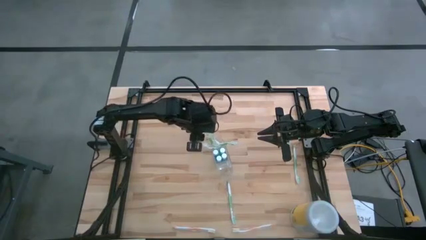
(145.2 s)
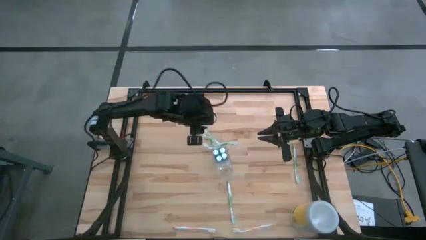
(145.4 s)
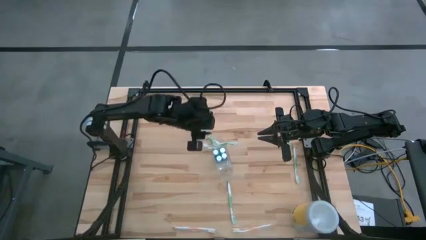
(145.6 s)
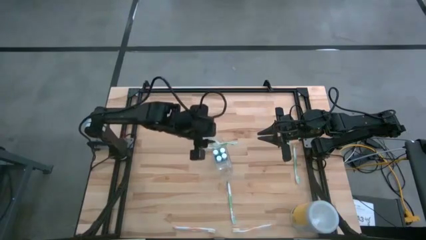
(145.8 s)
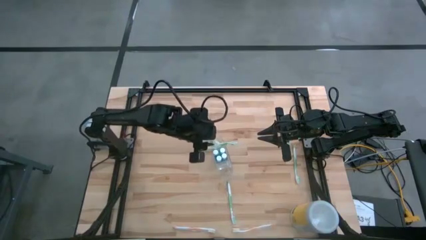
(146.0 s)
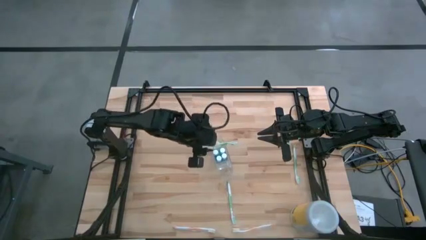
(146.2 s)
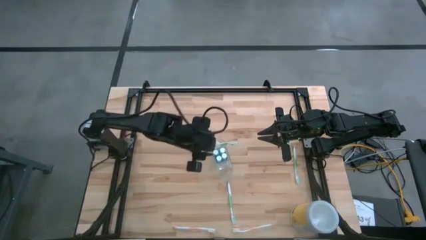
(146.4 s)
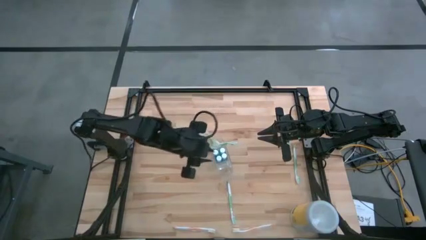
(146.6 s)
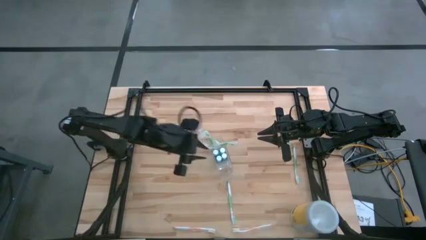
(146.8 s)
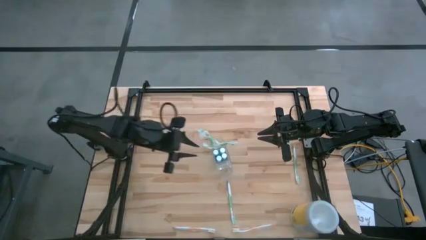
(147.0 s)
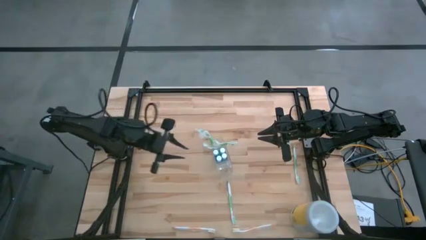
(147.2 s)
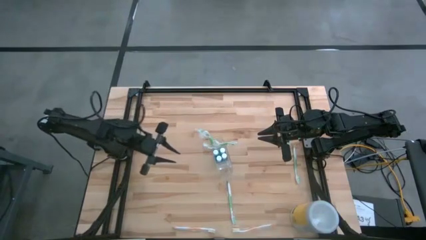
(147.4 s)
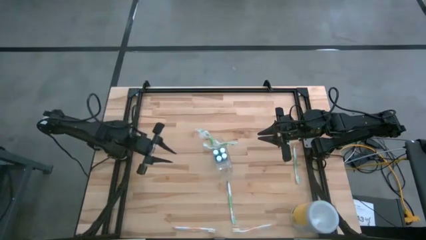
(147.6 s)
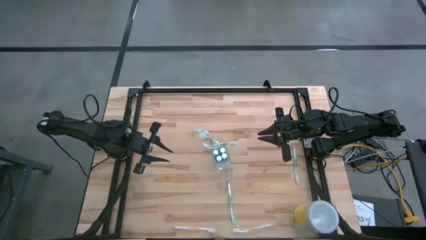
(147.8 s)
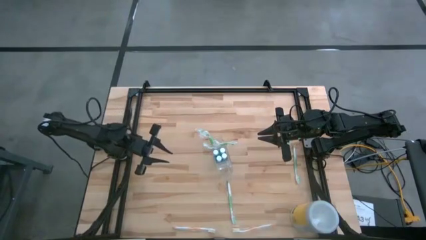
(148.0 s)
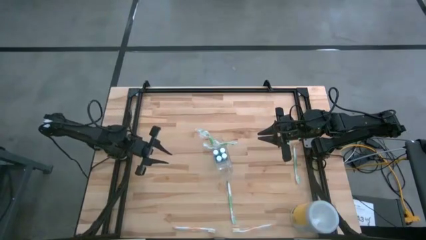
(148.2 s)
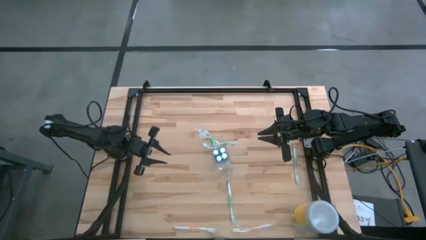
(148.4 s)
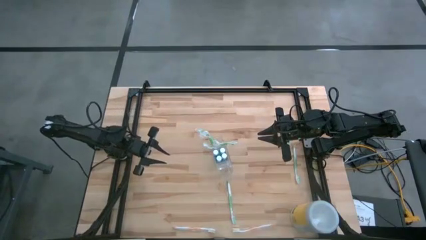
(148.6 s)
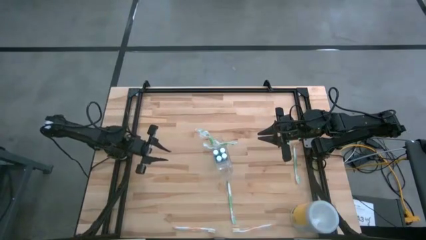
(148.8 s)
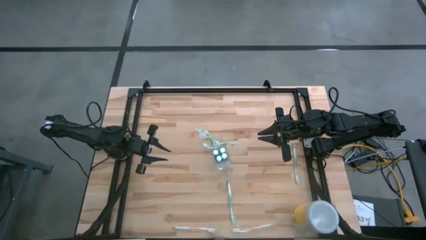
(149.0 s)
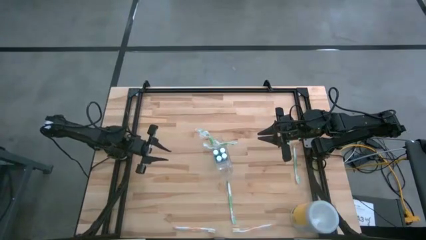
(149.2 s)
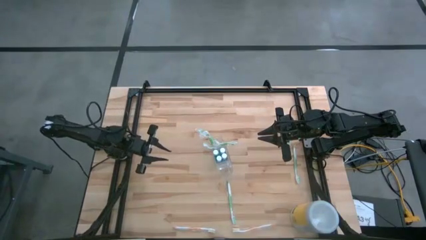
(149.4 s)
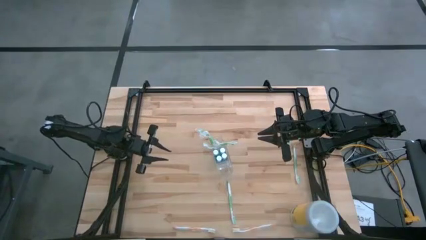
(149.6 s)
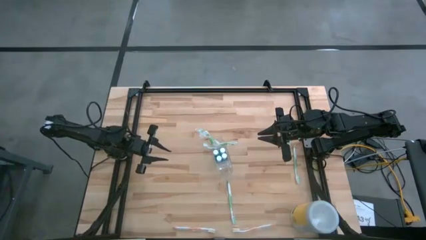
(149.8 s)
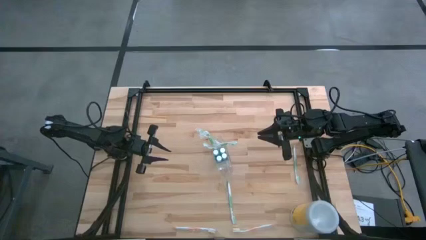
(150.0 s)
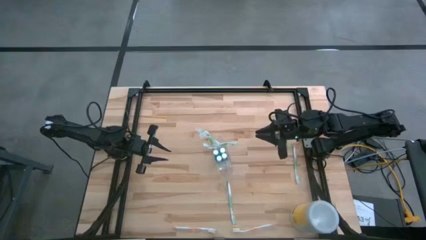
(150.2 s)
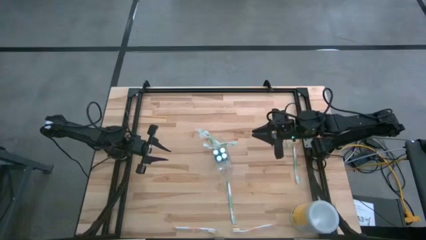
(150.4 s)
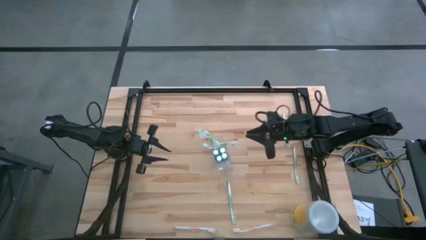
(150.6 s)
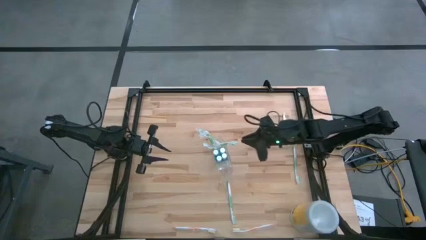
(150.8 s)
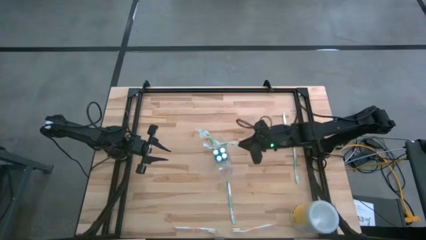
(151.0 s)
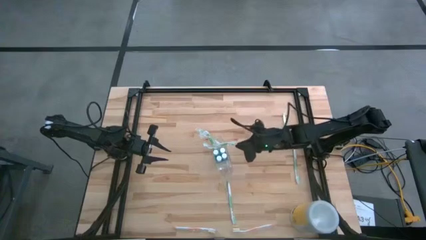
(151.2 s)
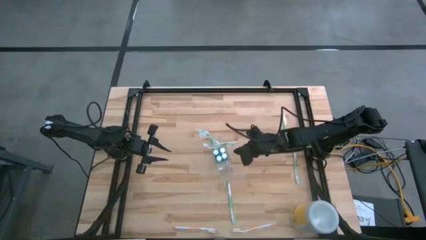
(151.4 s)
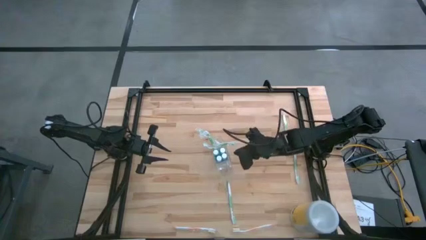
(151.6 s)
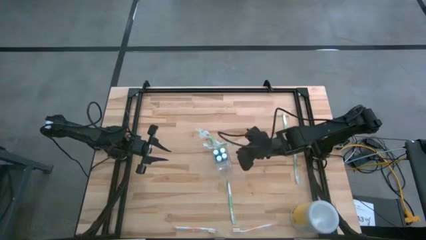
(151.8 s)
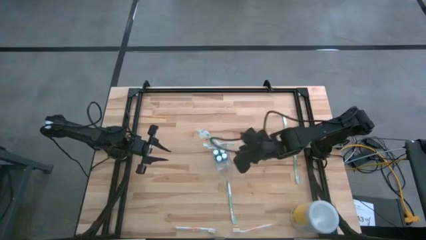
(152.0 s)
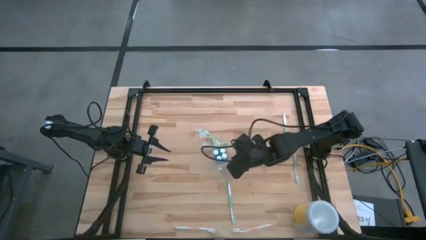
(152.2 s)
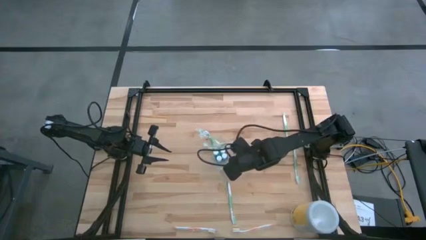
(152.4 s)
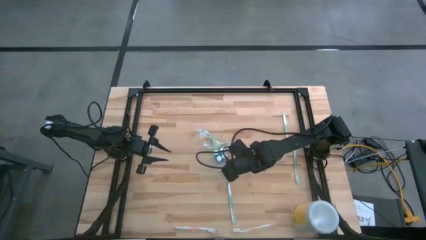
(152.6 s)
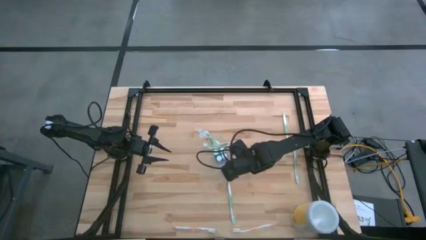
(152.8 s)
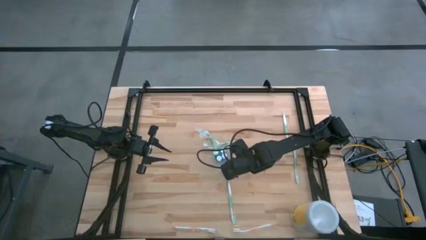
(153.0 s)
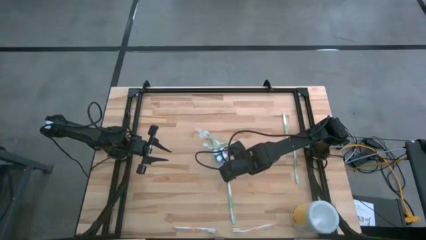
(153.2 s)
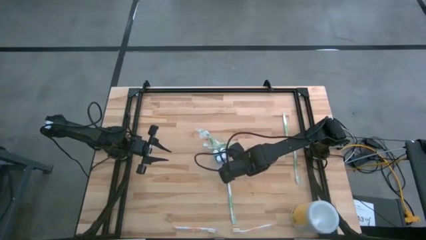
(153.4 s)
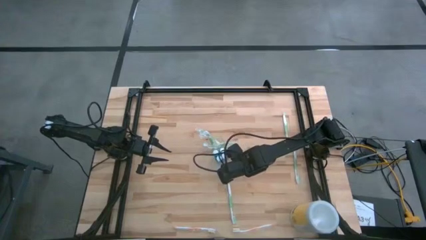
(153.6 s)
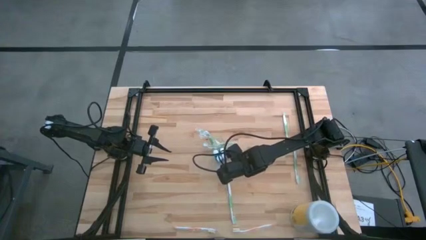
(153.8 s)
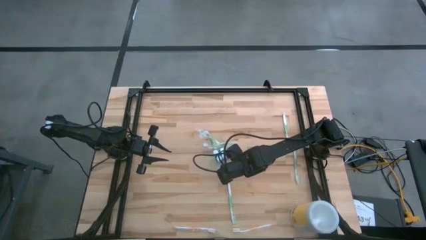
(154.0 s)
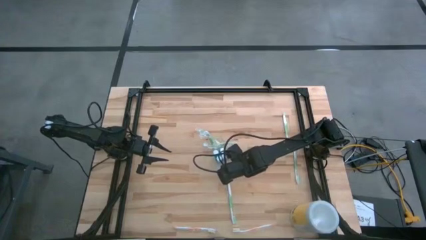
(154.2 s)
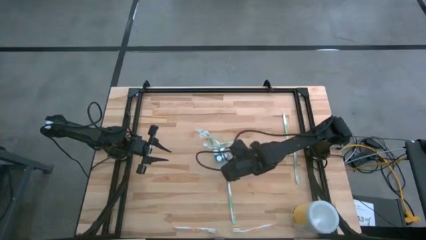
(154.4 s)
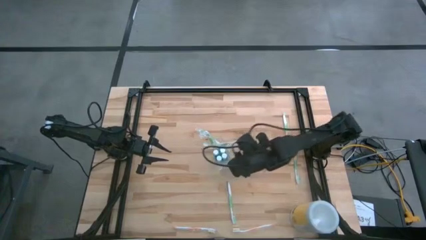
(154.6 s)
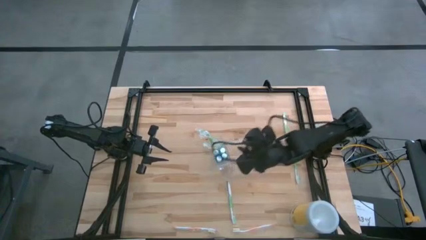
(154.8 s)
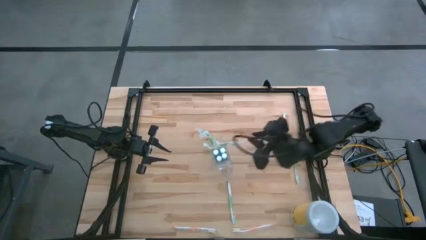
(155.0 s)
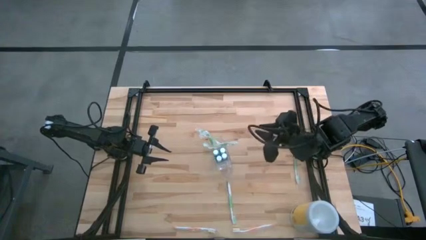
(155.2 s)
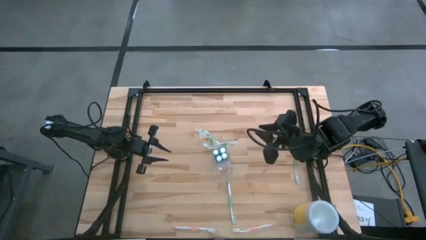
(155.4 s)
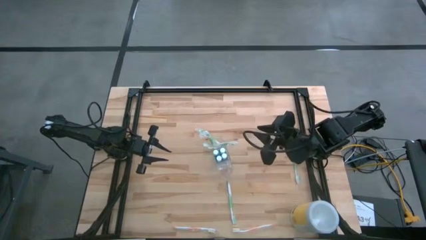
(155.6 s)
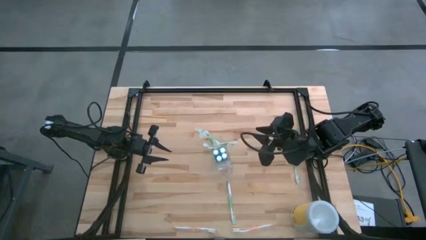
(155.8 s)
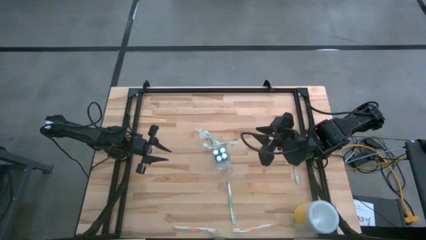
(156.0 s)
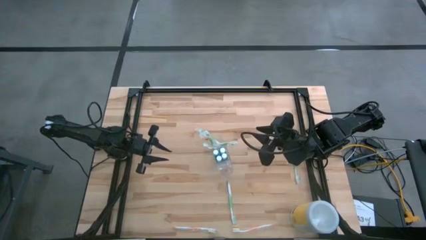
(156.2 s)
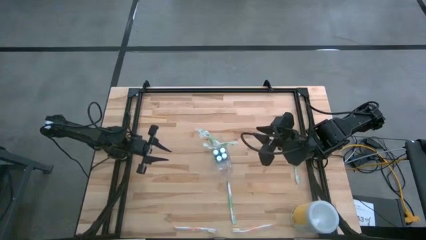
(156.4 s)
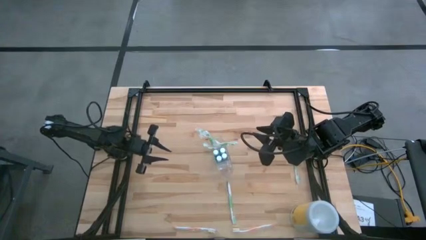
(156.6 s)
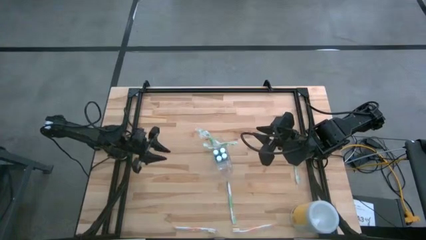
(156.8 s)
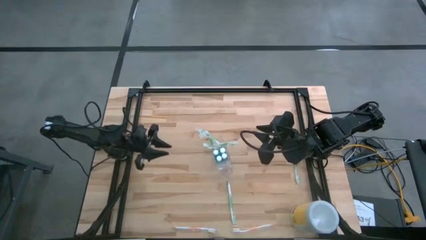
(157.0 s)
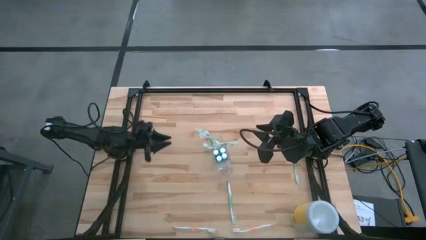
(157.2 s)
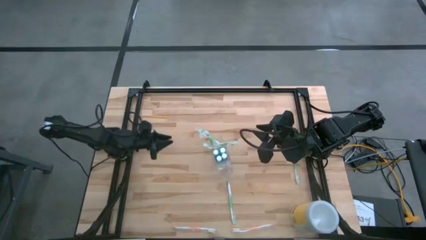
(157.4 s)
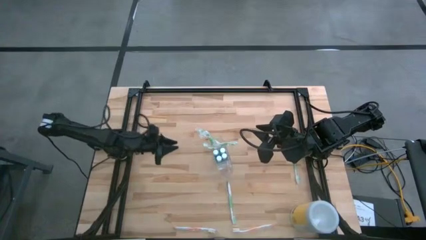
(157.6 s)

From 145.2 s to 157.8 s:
Task: Pick & Place toothbrushing station
Adjust the transparent organizer

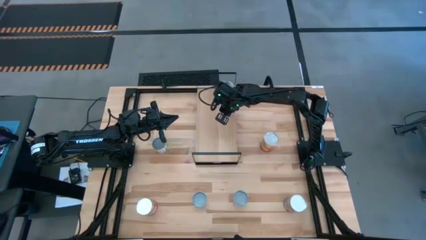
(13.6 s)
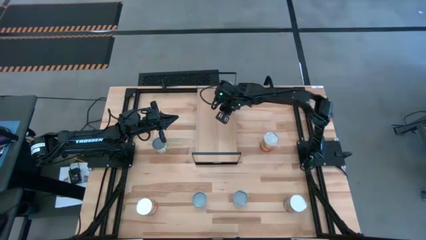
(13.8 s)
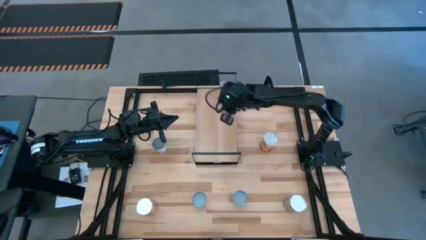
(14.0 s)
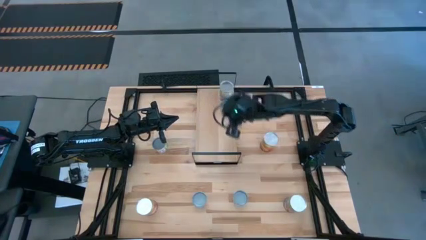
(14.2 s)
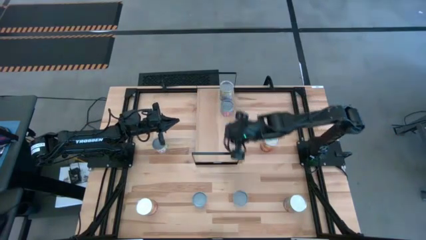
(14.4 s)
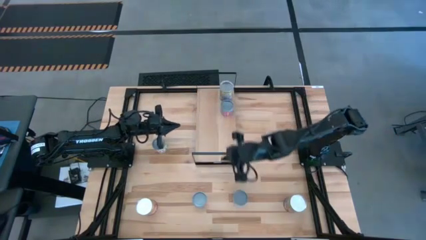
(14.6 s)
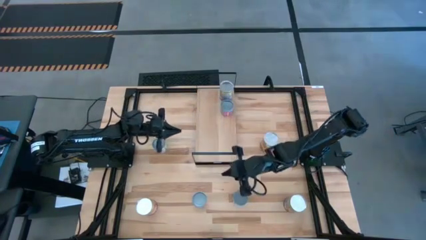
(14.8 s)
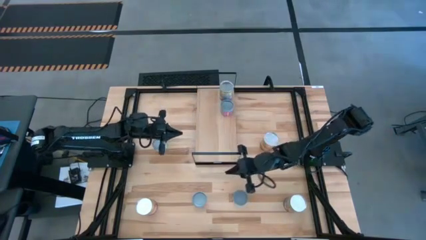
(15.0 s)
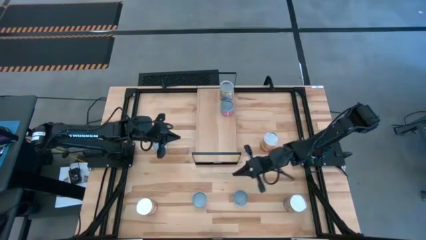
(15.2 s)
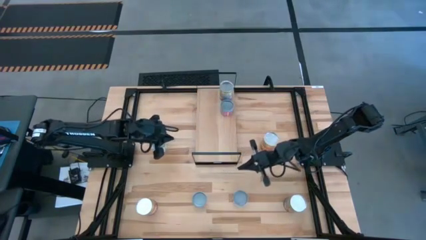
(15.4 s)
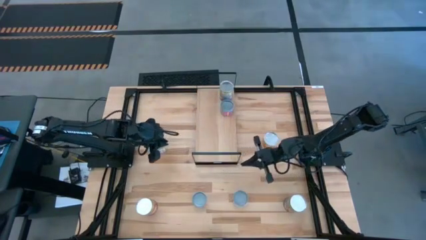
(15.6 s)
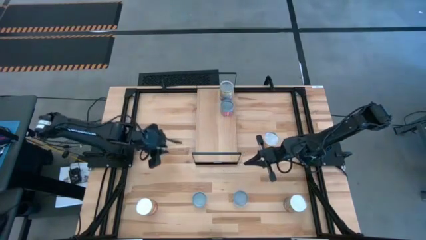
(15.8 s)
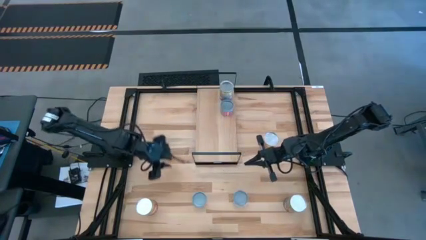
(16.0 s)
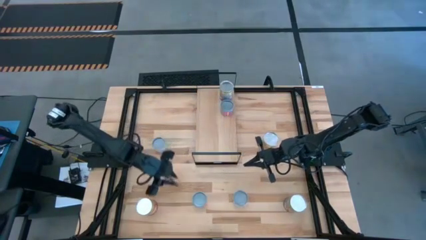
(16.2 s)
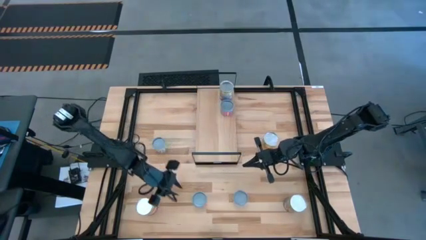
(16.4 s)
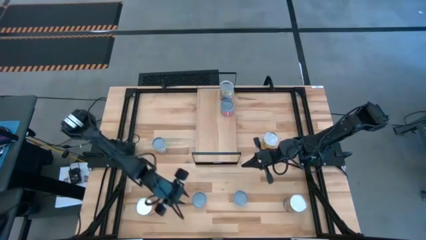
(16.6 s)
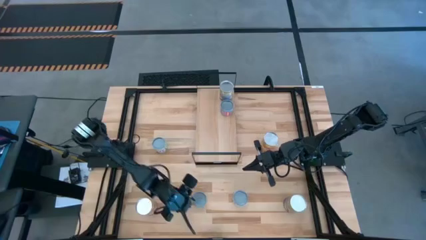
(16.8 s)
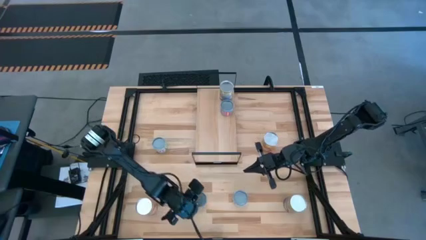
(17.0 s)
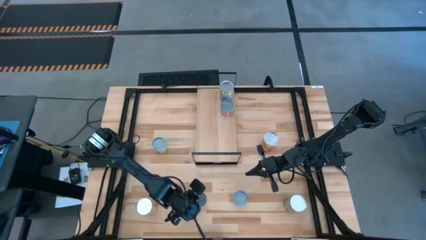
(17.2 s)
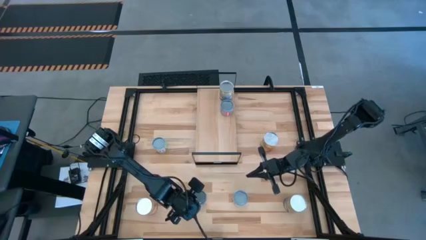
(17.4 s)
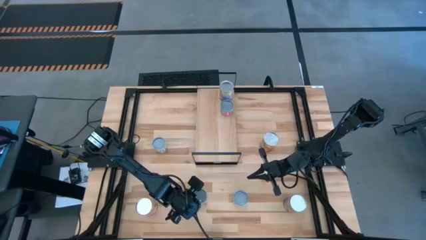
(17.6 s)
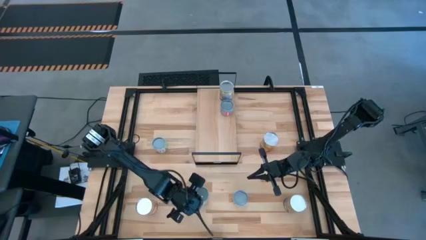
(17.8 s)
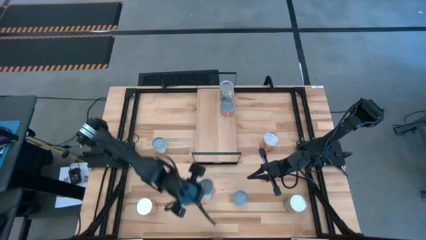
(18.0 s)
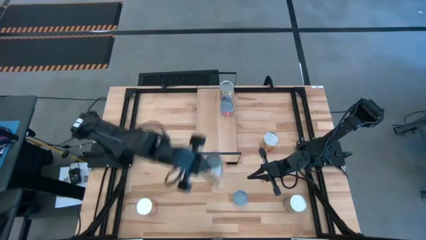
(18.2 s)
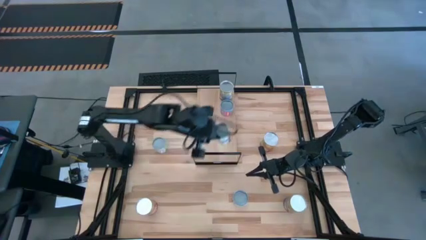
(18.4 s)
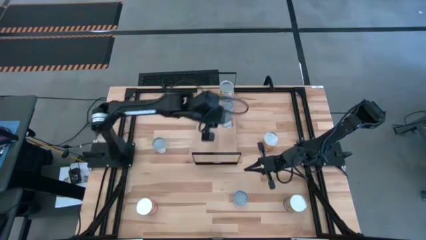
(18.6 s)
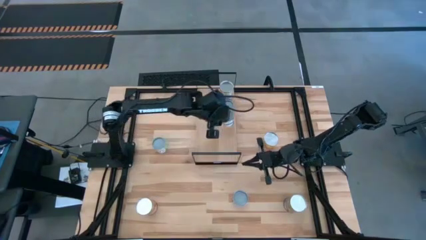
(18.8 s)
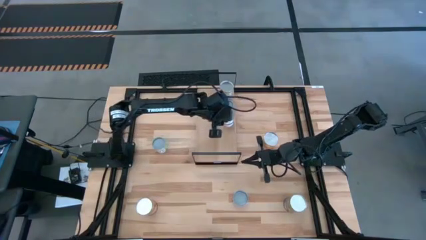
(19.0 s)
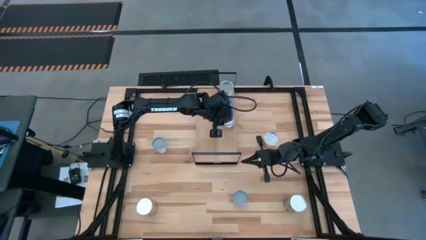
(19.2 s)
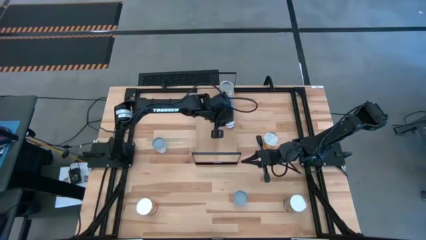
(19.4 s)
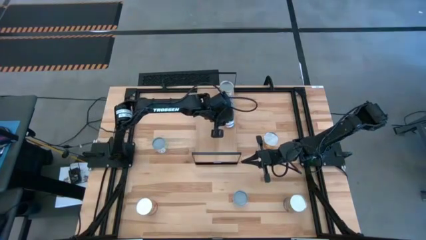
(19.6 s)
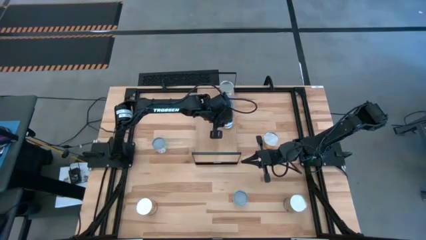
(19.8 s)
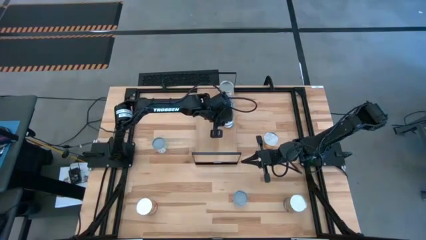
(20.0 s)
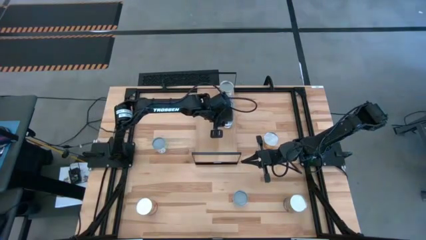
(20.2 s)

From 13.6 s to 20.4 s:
Task: Pick and place cans onto a shelf
Put the mandarin oranges can on the shelf
